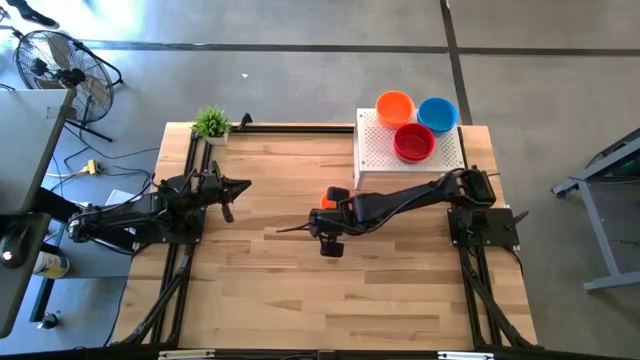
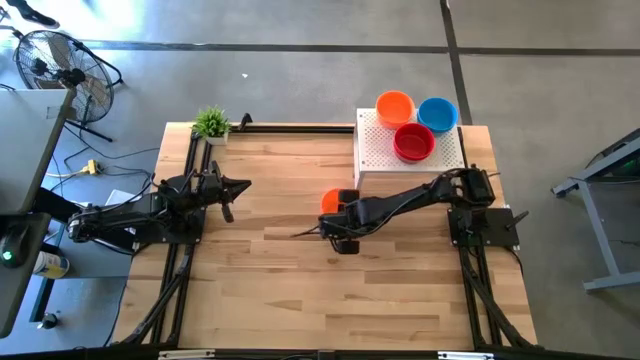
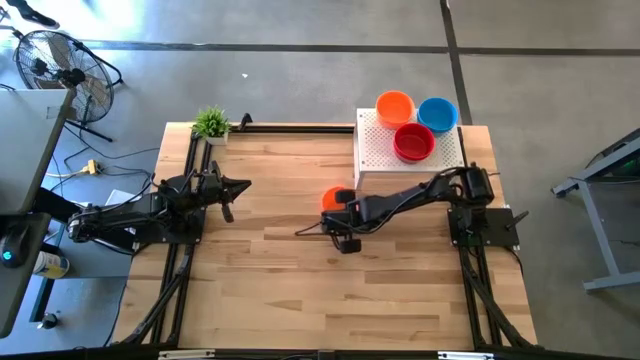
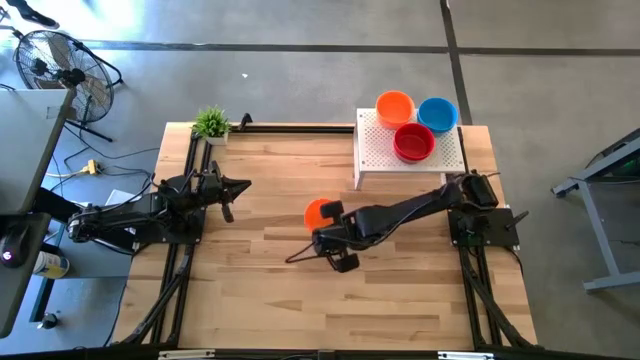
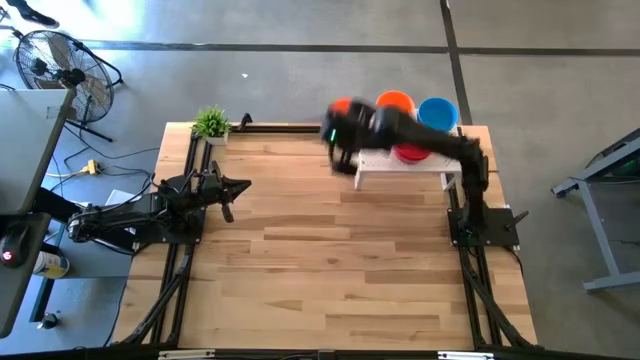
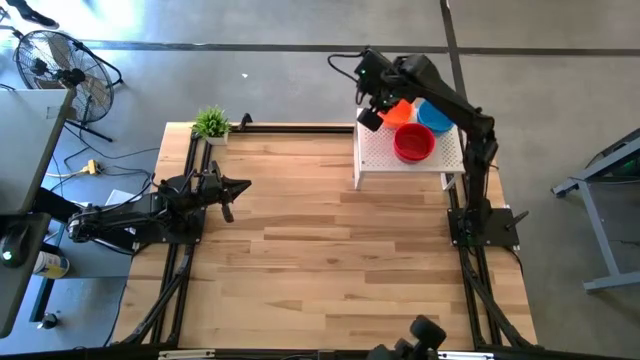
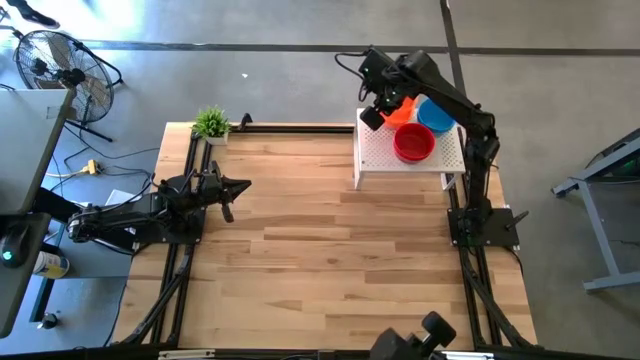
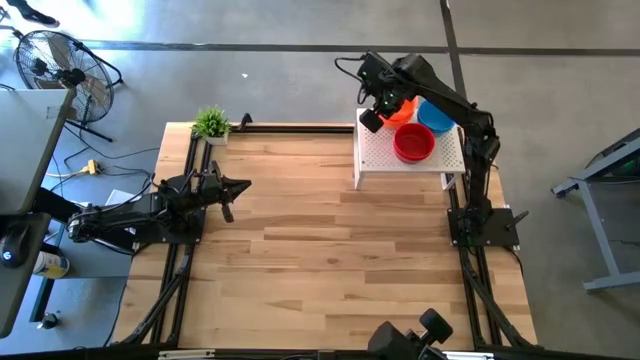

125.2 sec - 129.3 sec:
Task: Pick & Place Mini bowls
Stack the orange bowl on top of the orange bowl on the shelf

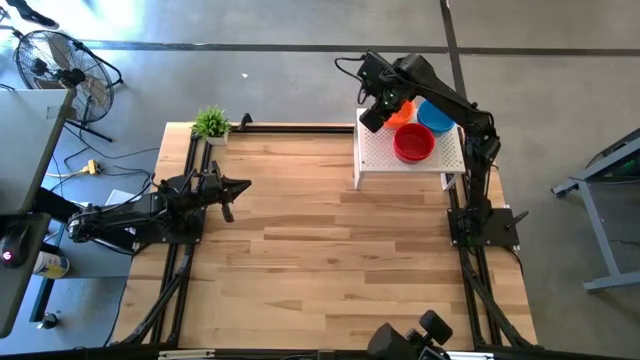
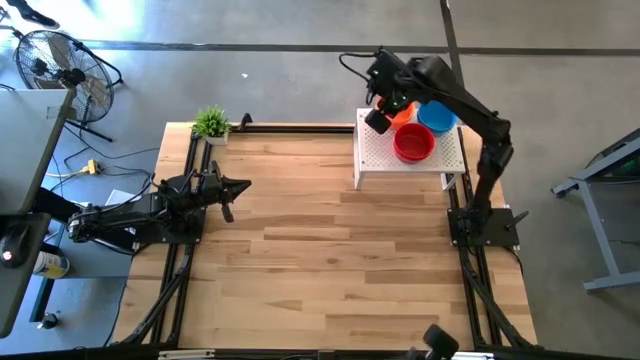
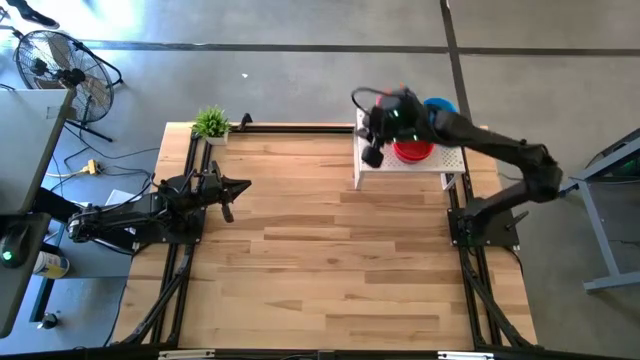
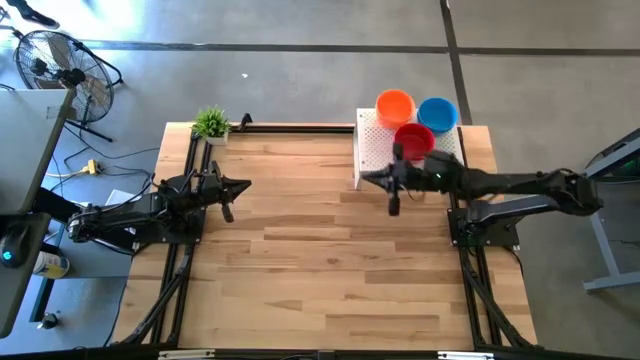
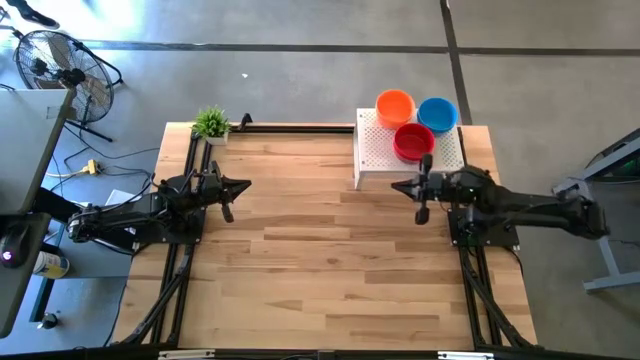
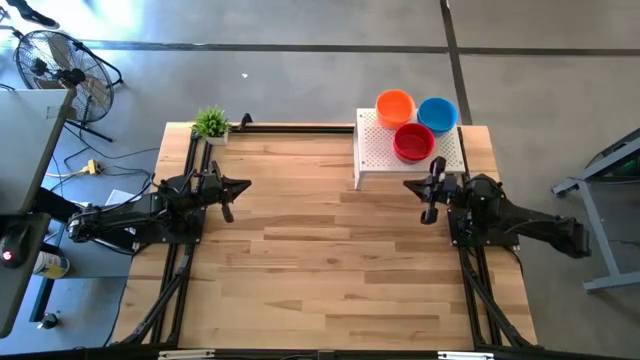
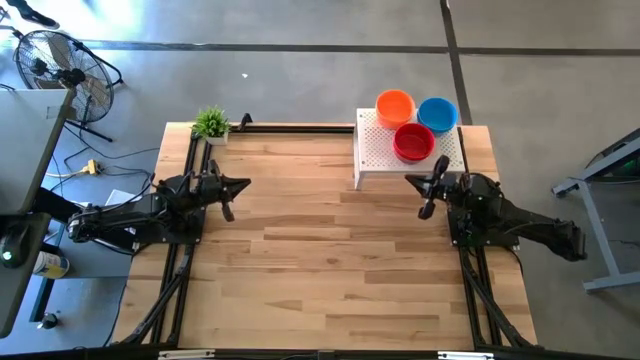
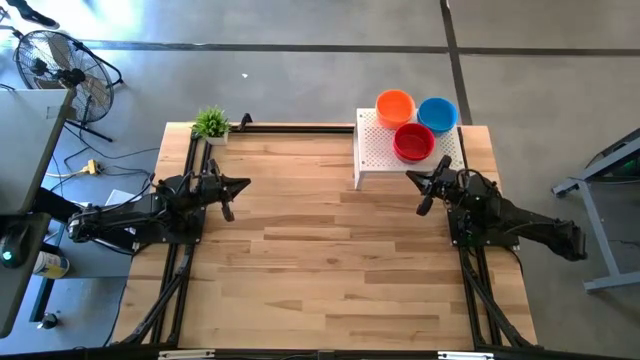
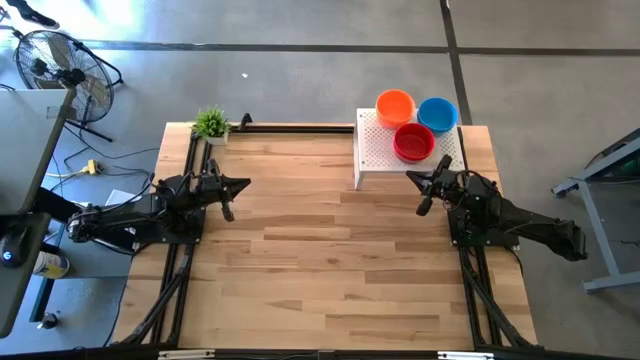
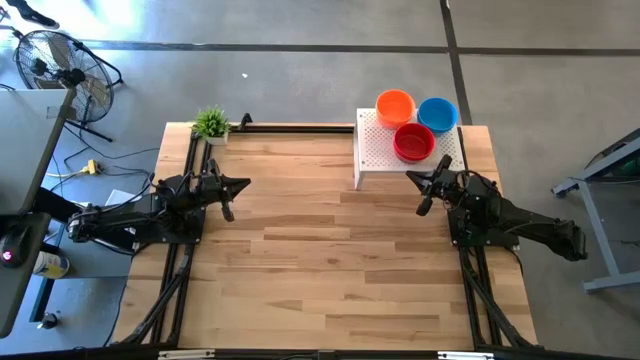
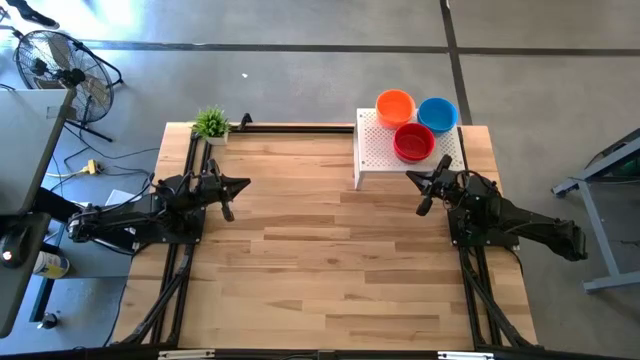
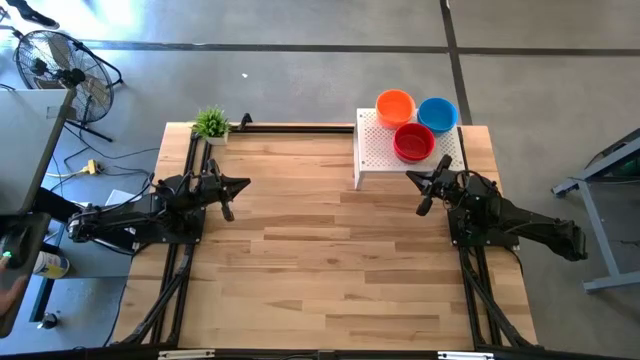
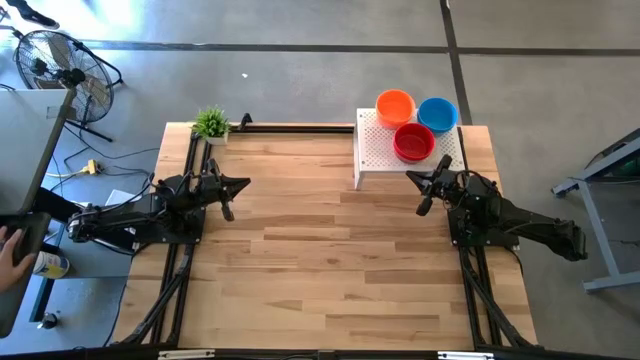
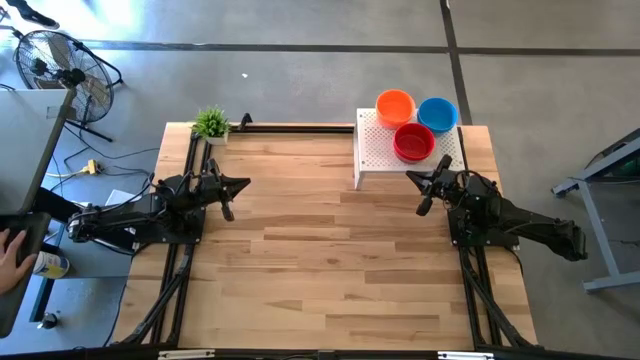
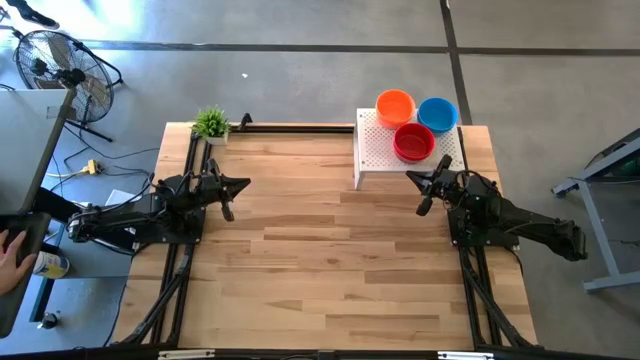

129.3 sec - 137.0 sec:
Return to Home Position

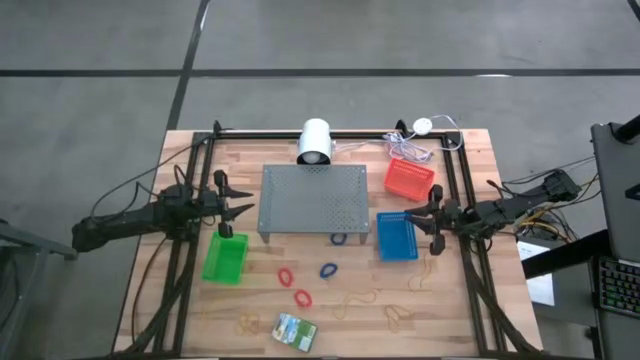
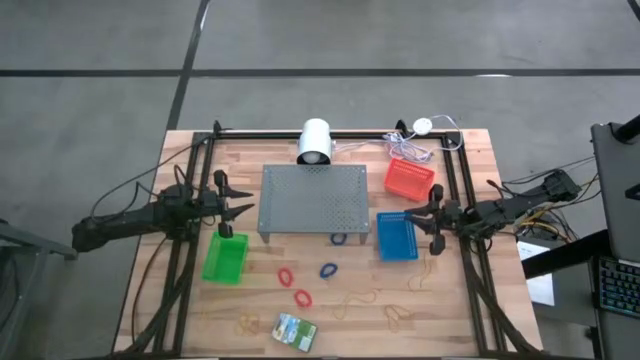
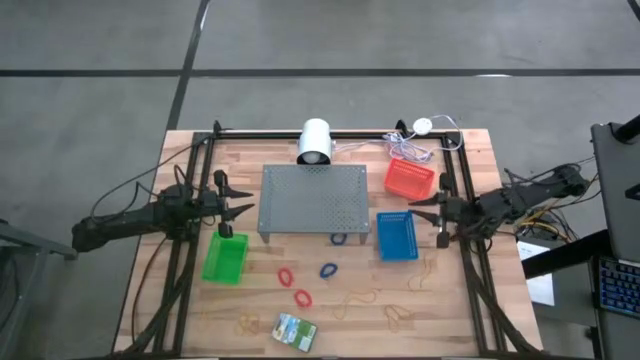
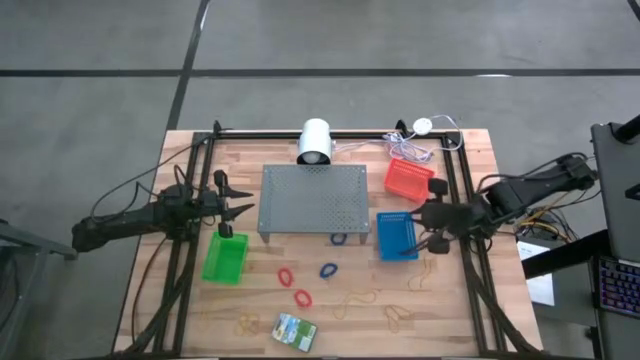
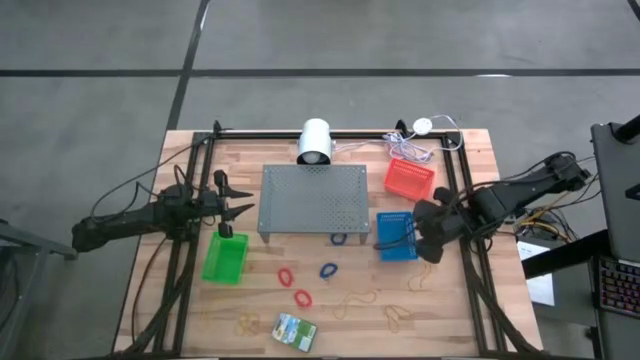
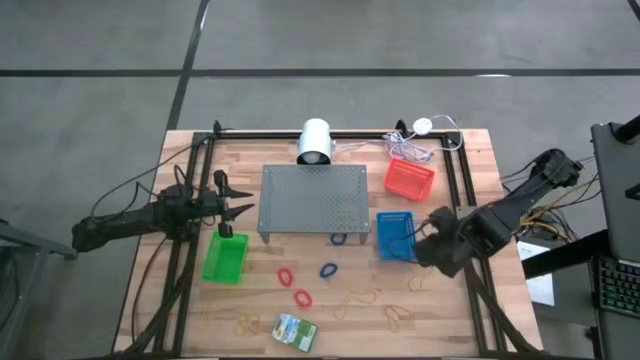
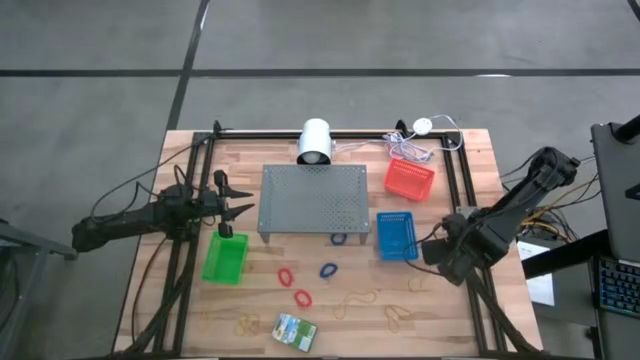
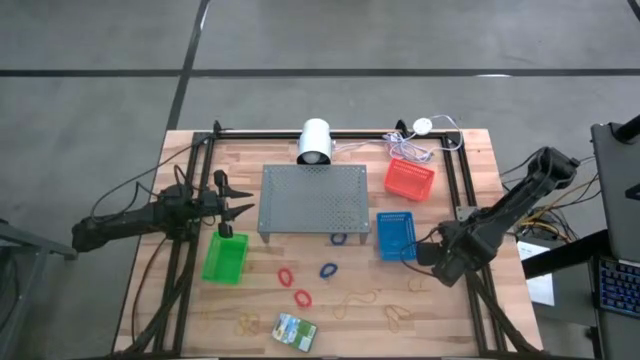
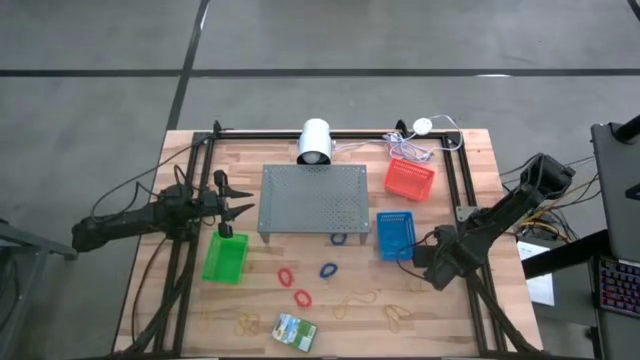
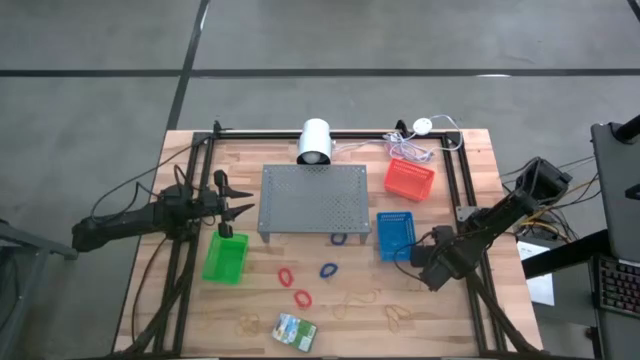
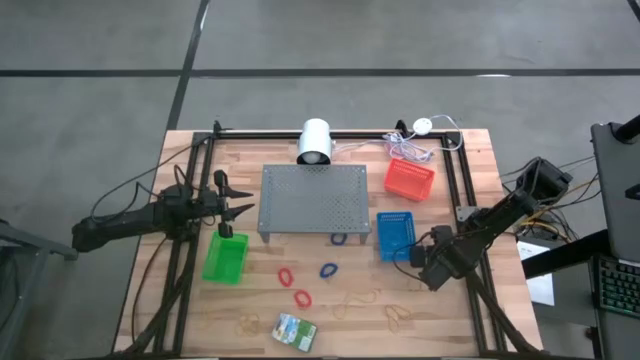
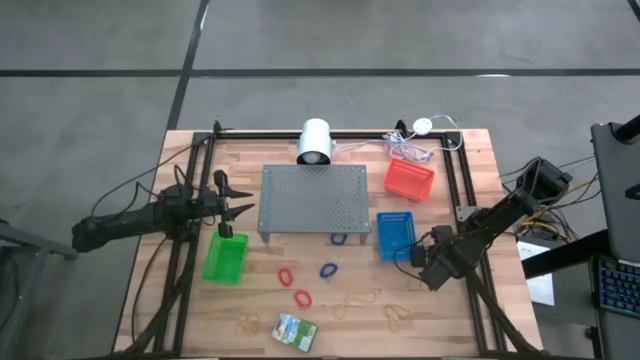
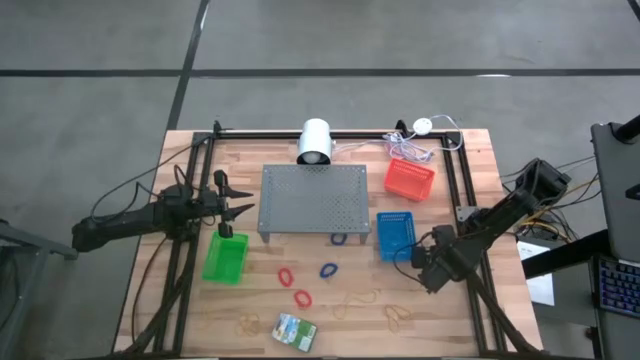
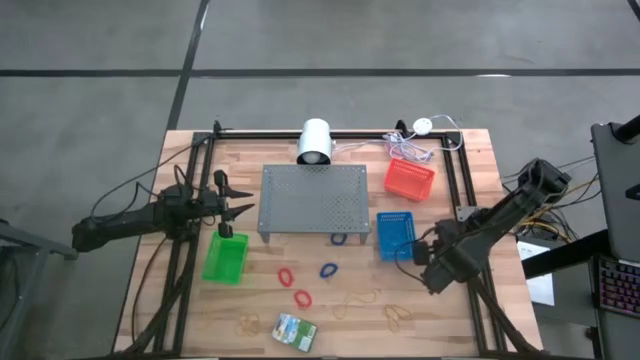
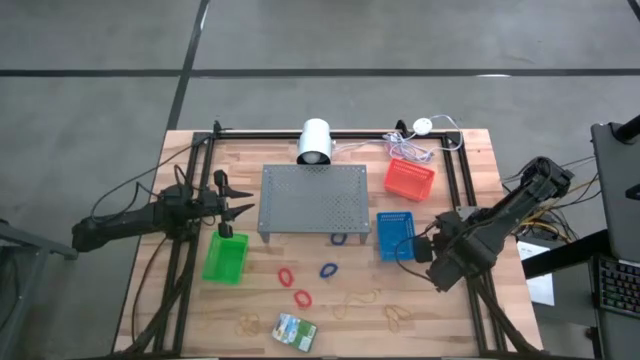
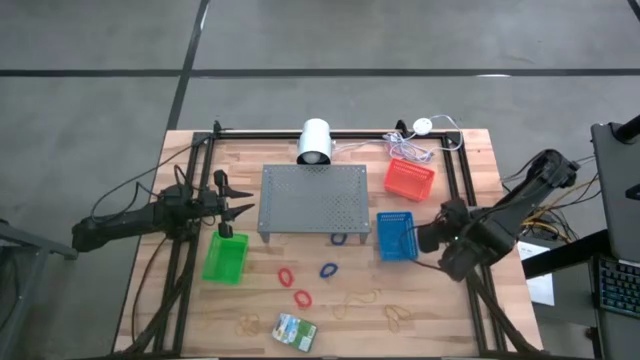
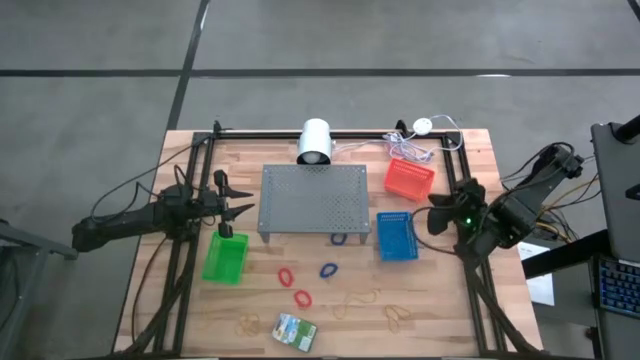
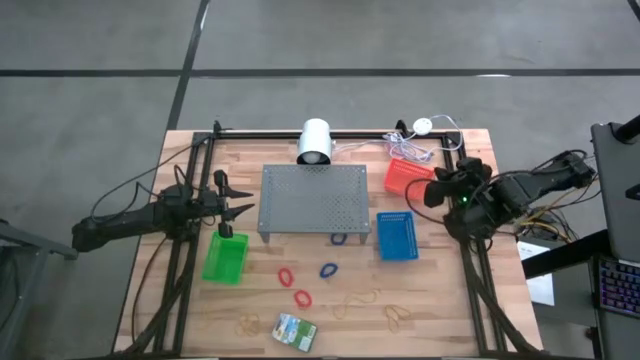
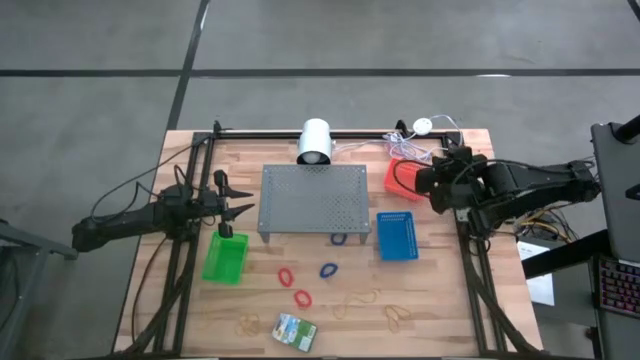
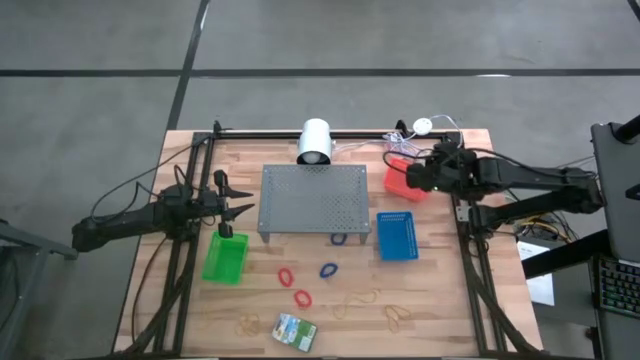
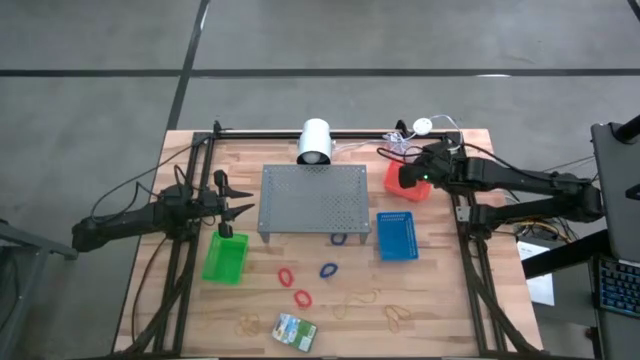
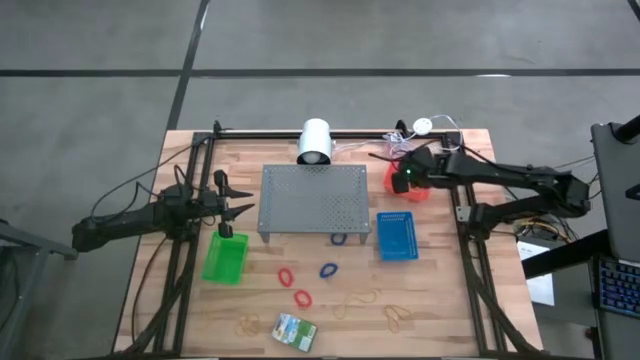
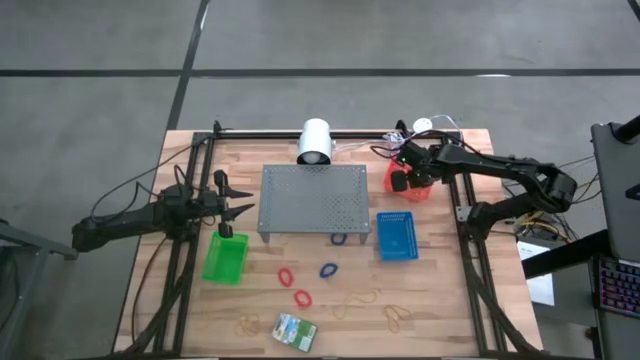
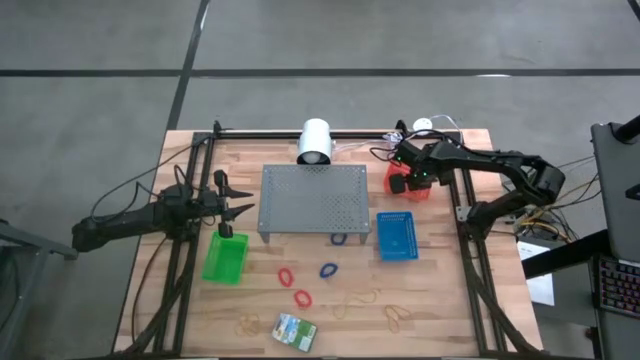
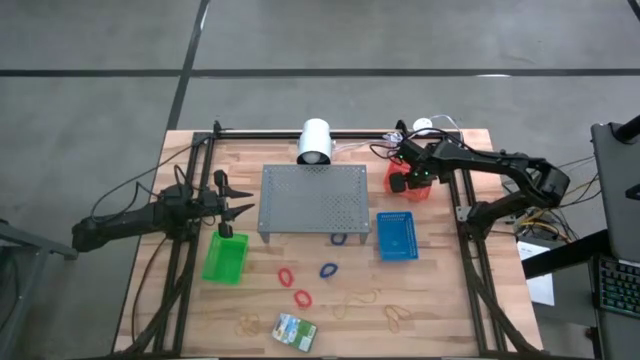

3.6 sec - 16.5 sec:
Task: Pick & Place Office Desk Supplies
Put the yellow rubber band into the orange bin
